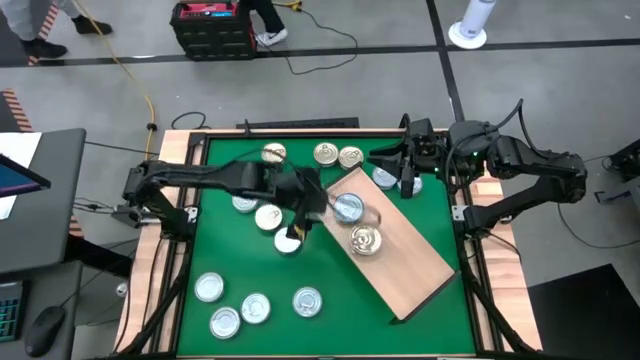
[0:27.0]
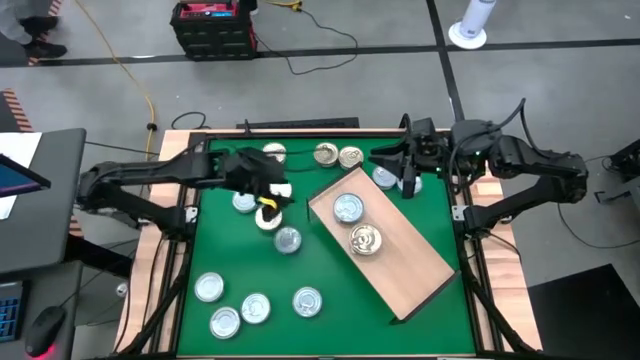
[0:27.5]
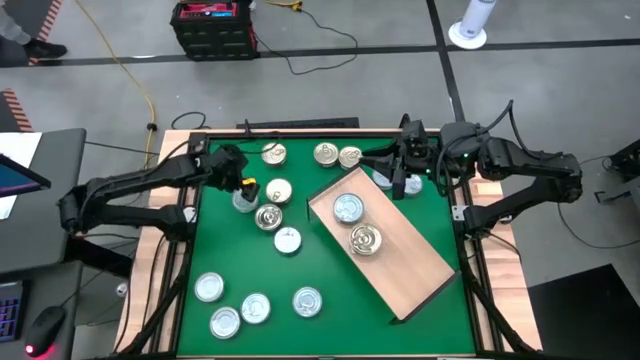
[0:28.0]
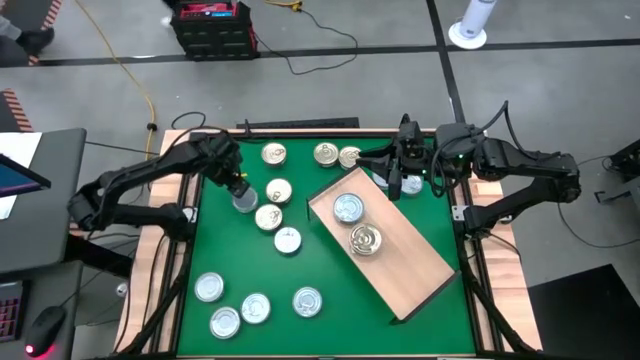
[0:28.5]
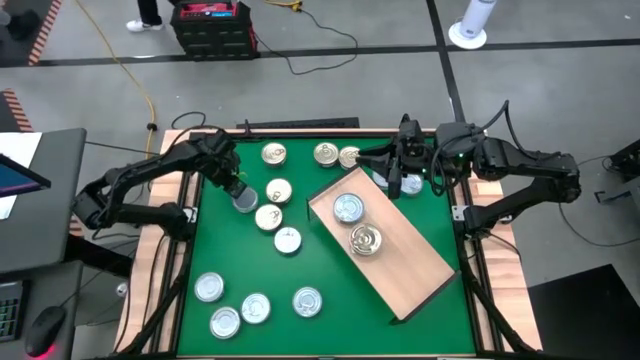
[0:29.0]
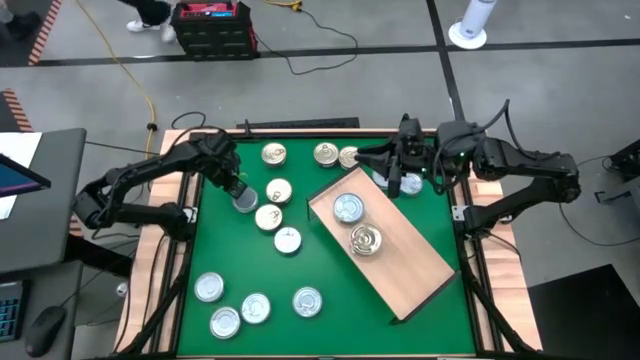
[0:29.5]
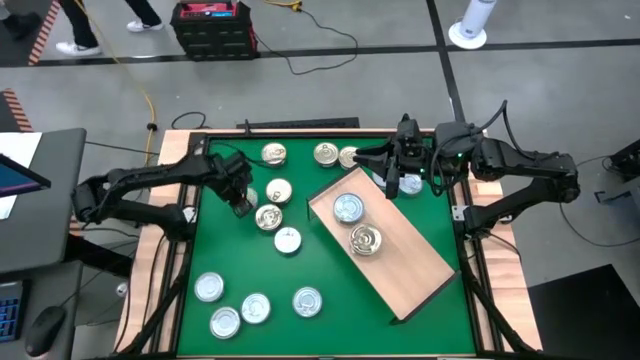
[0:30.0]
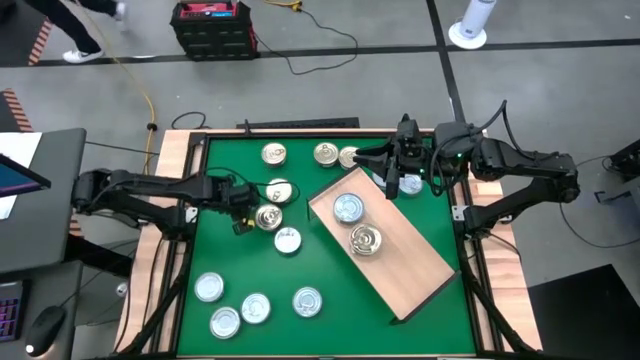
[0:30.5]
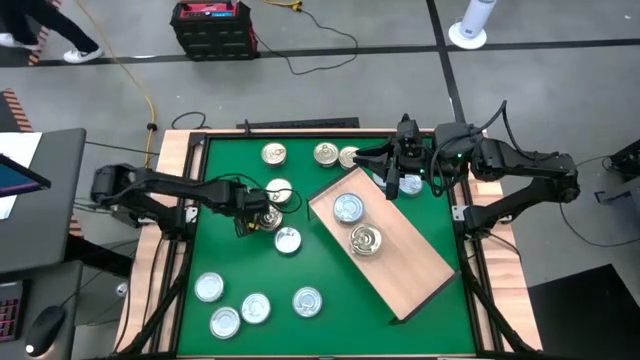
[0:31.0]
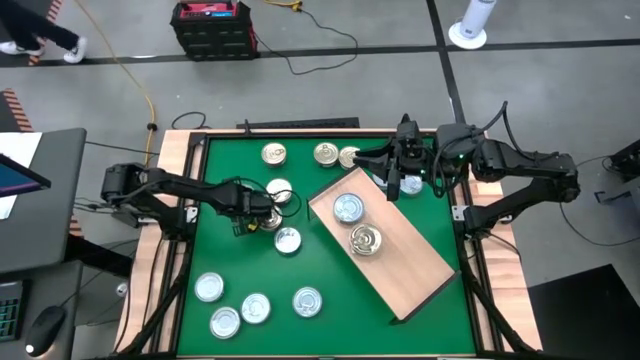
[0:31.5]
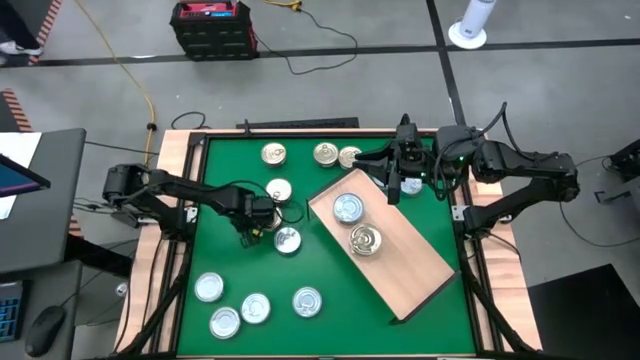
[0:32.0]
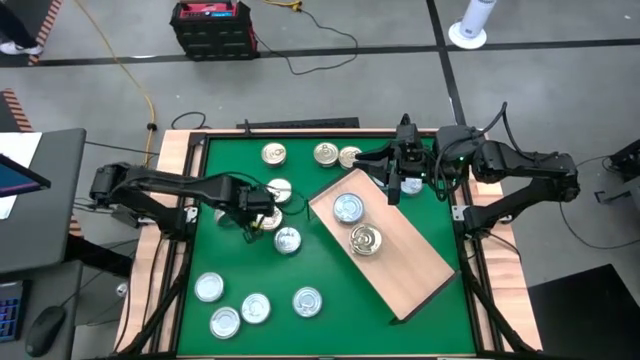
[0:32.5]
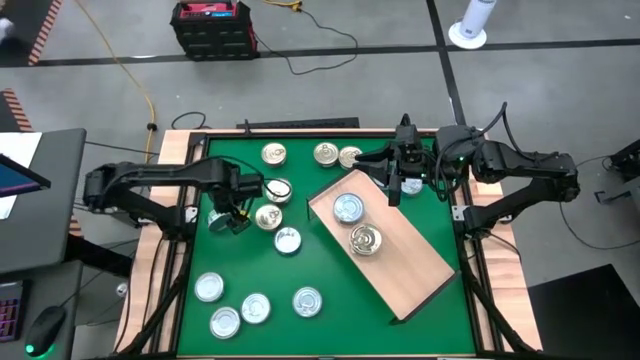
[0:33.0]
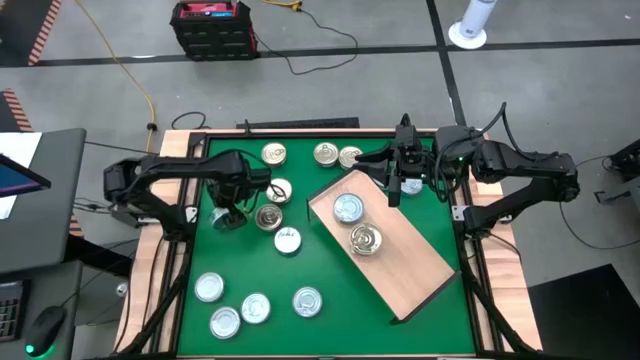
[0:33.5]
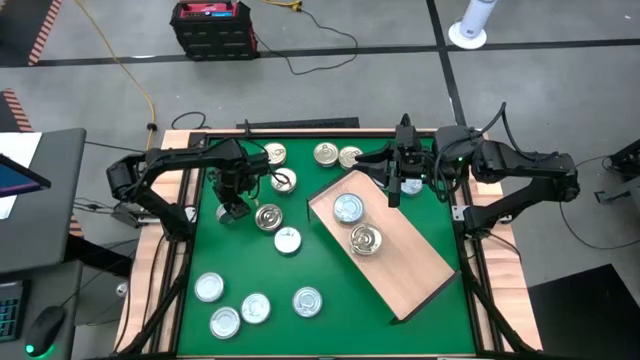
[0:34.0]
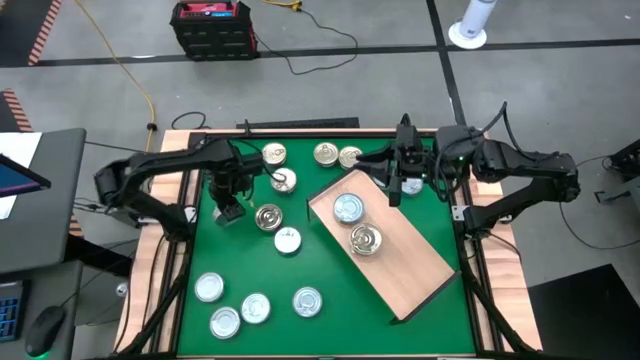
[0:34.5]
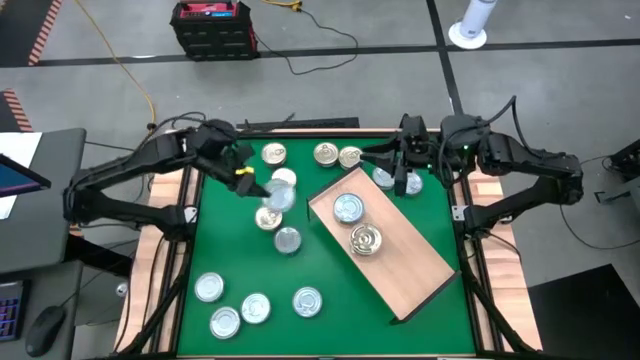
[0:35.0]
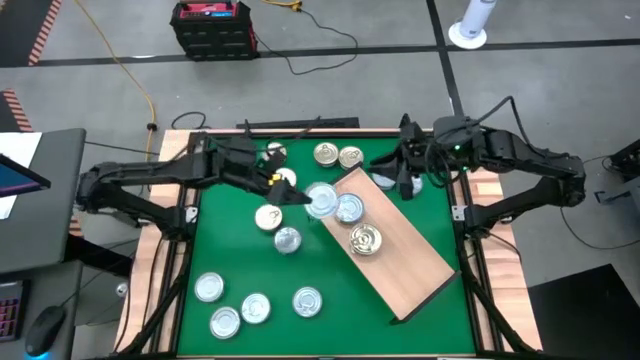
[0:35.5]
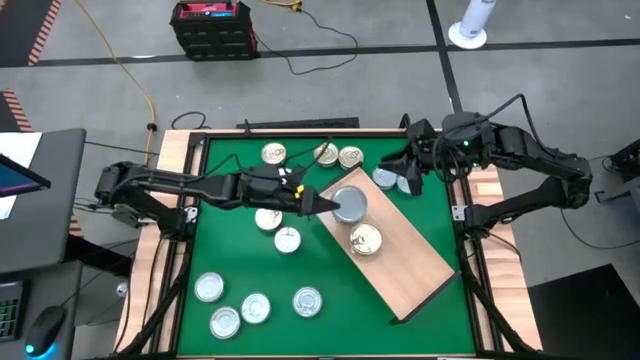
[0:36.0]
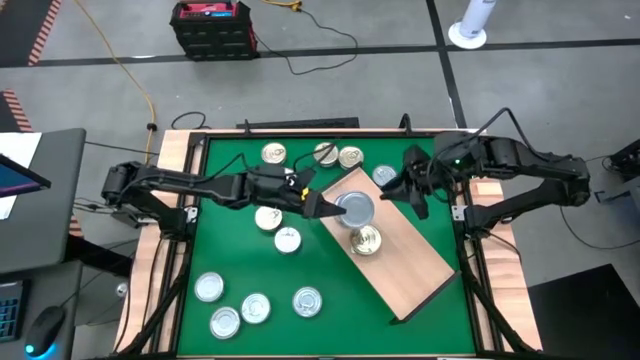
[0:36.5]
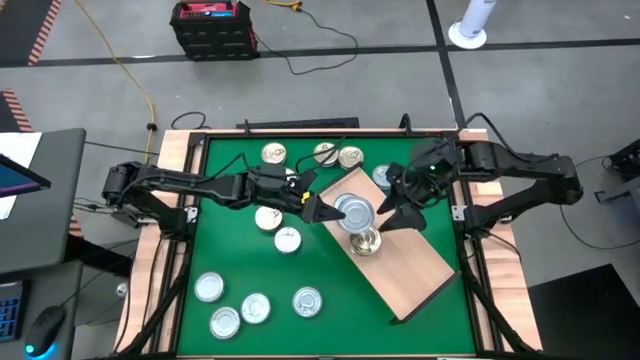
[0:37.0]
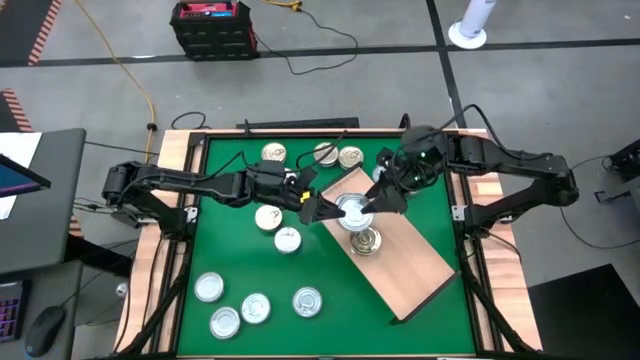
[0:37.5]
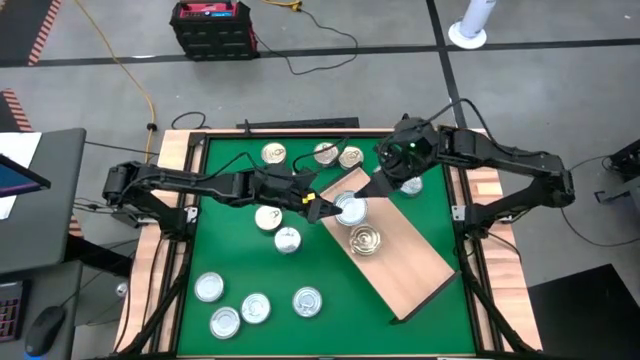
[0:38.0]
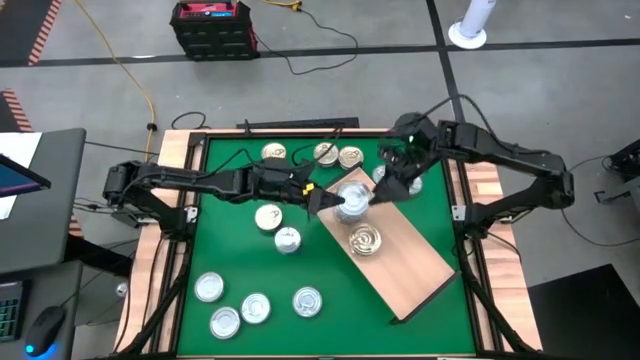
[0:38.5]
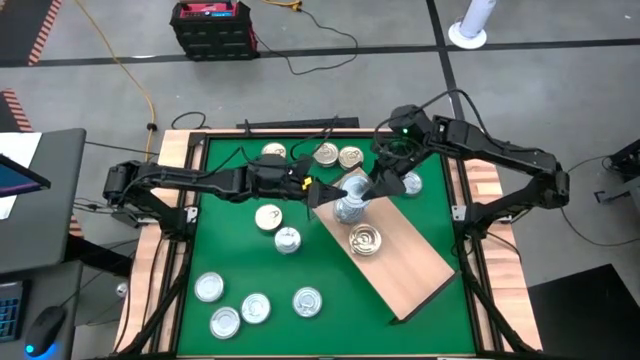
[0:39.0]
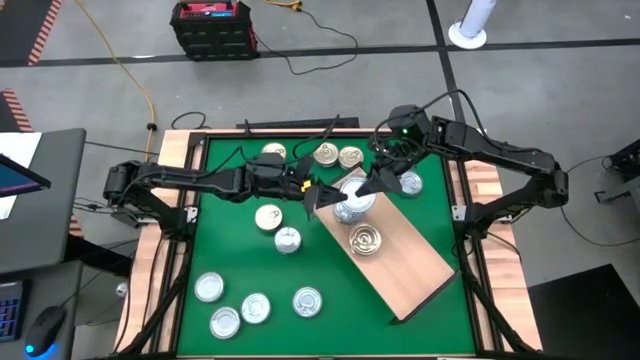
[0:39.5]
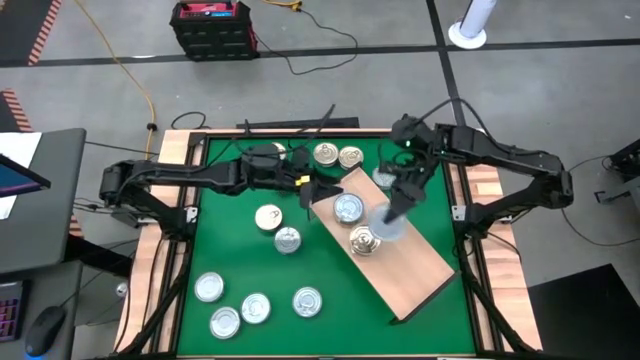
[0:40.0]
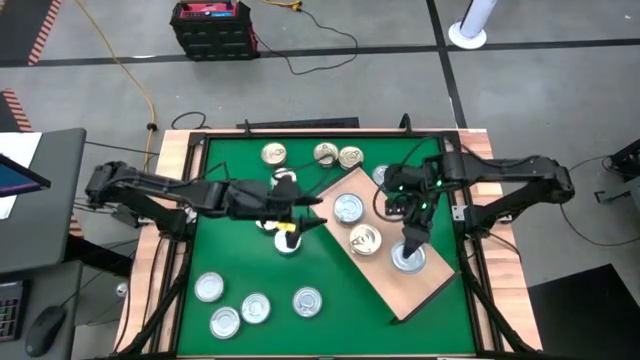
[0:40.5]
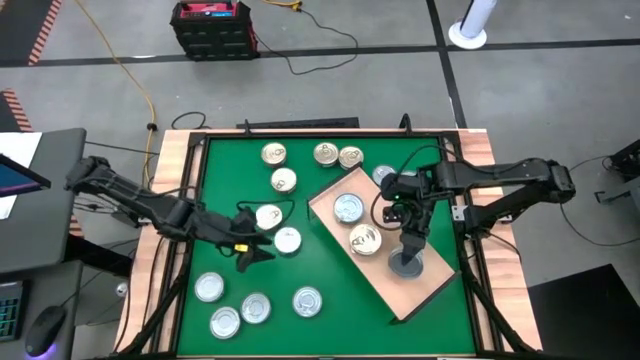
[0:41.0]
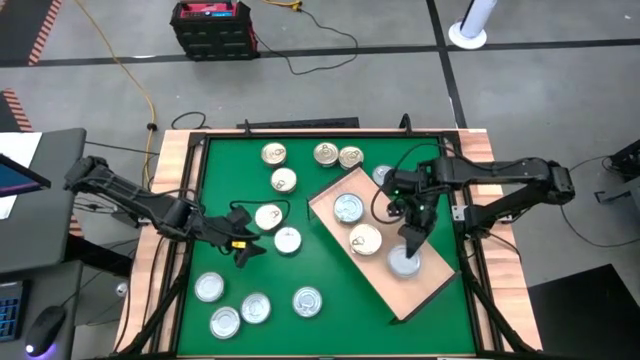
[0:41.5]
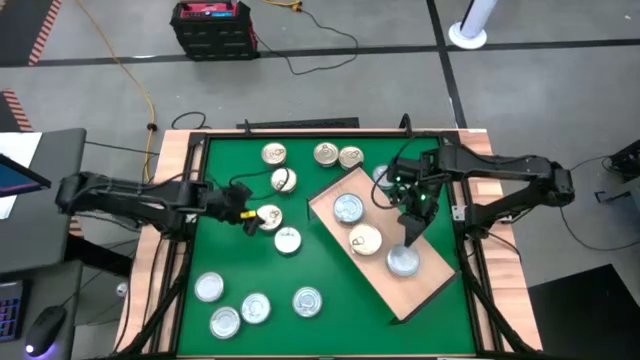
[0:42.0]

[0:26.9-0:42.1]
Task: Stack canned seafood by type on shelf
Put the light green tuna can on the shelf

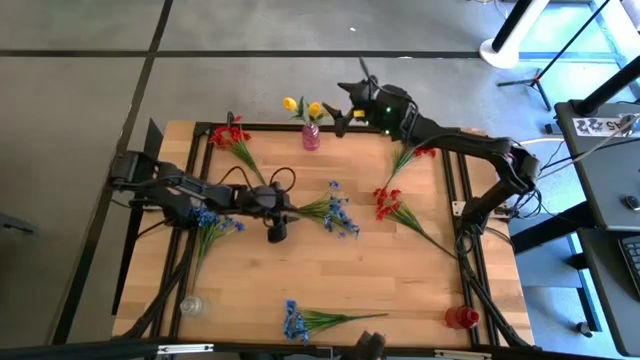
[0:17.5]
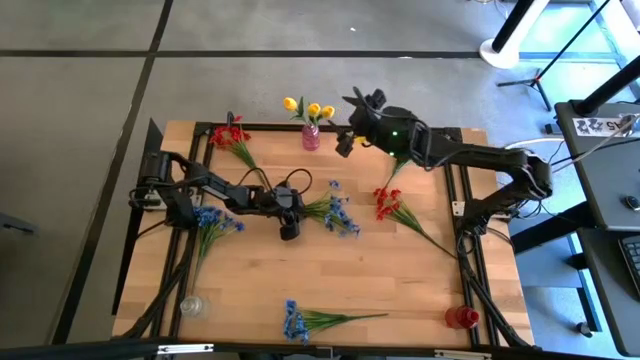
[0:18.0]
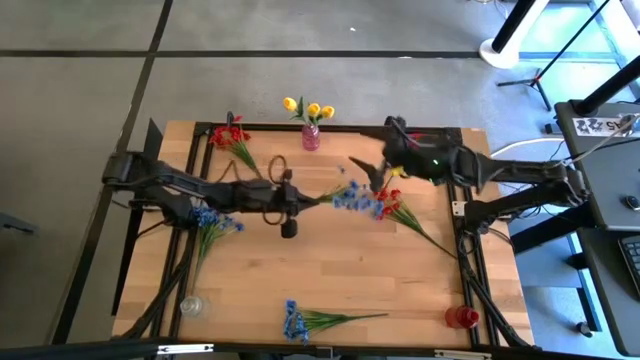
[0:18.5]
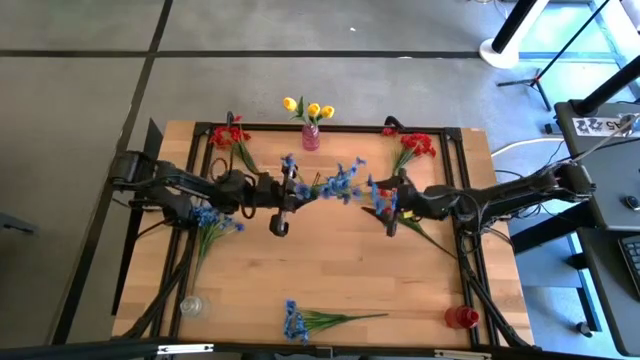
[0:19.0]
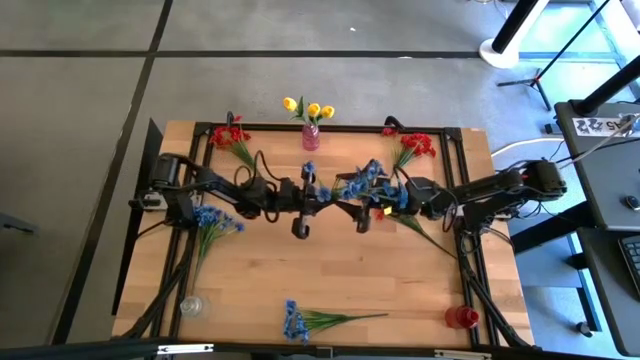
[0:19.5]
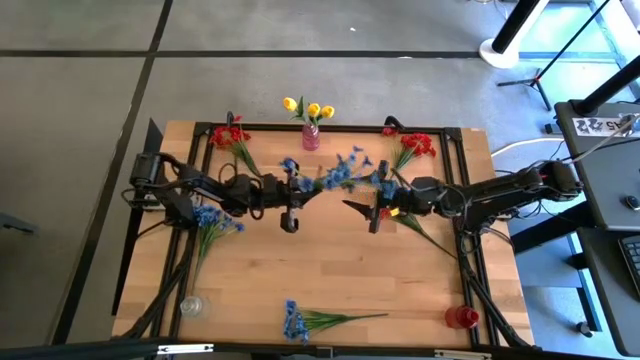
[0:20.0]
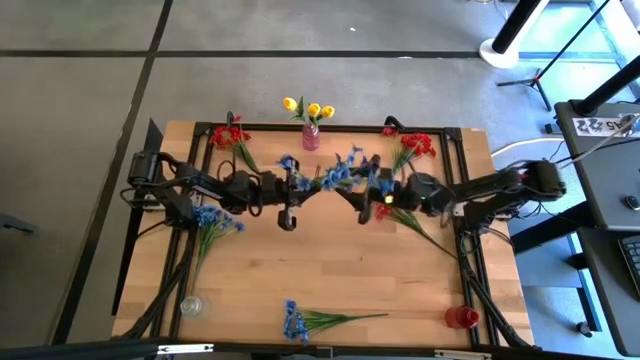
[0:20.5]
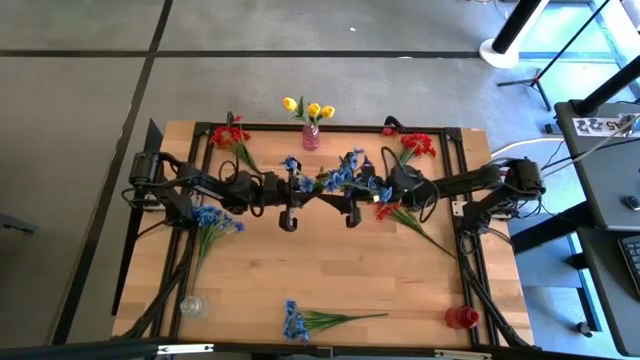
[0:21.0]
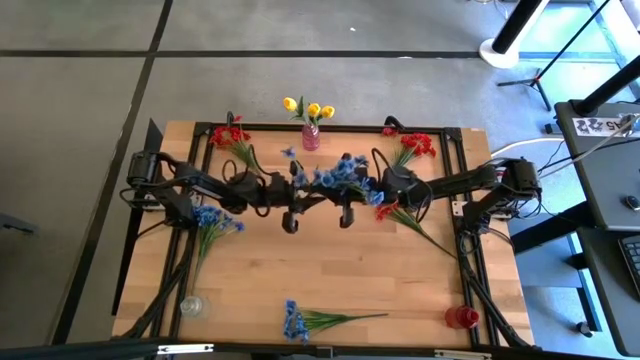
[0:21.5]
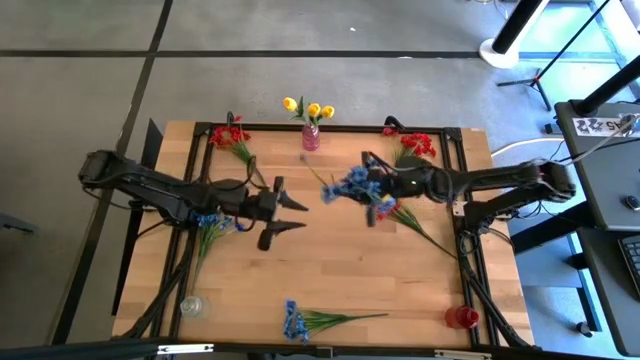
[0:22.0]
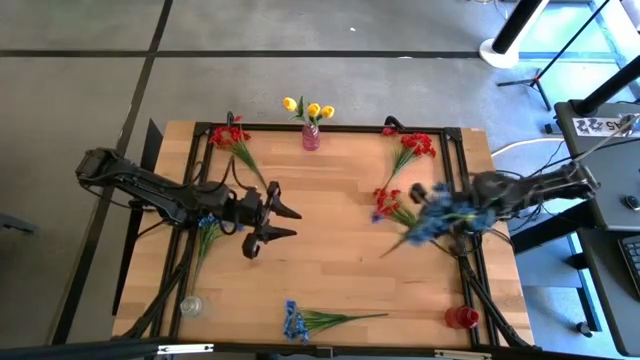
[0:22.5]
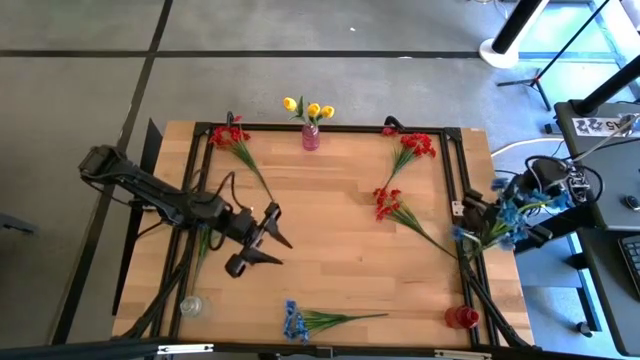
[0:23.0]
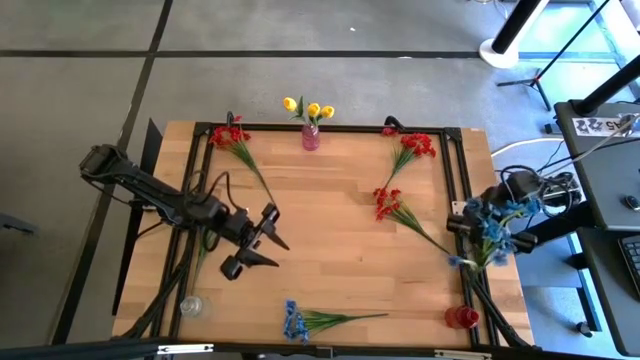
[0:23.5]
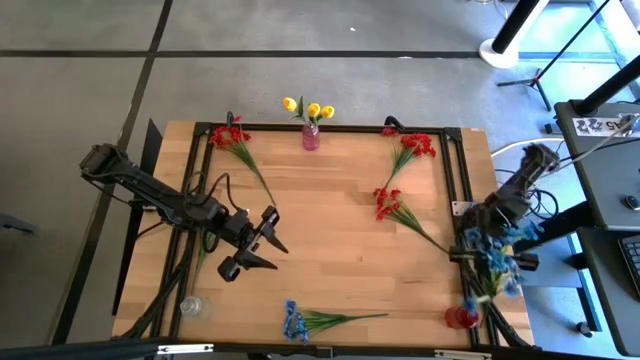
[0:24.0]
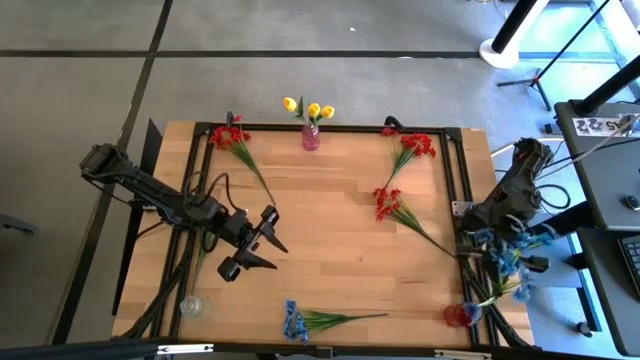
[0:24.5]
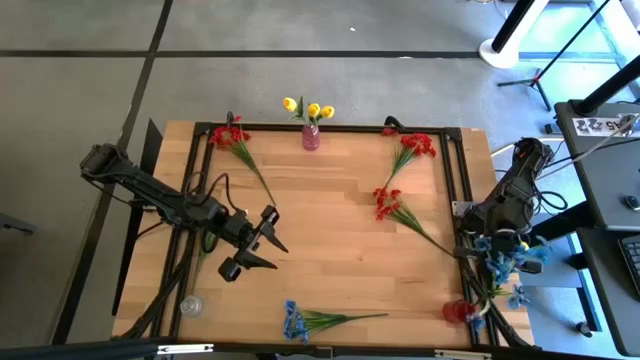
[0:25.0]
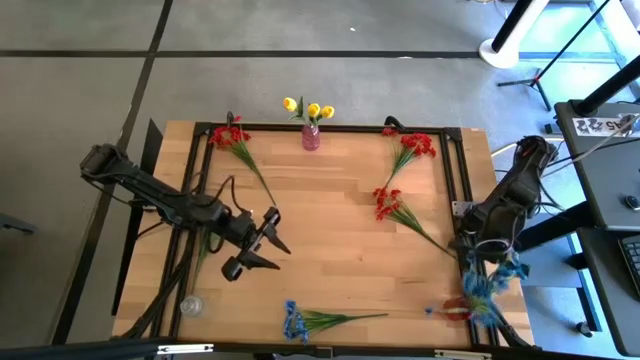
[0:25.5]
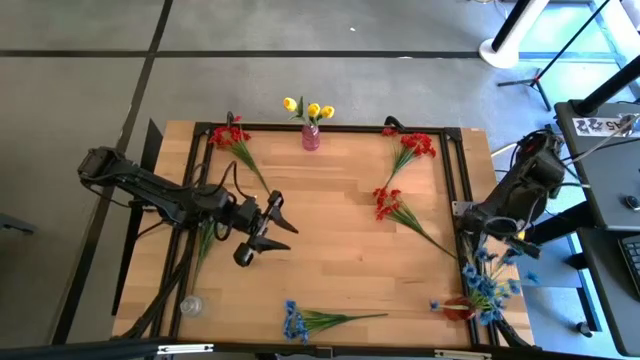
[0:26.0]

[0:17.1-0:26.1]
Task: Sort flowers into vase by color
Put the top right blue flowers into the red vase
